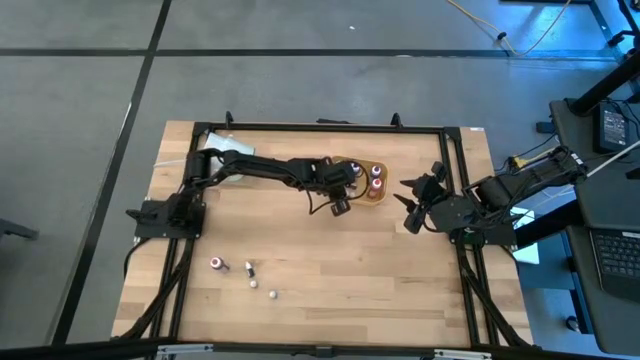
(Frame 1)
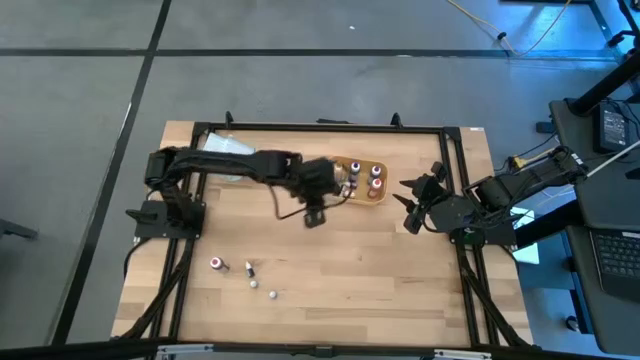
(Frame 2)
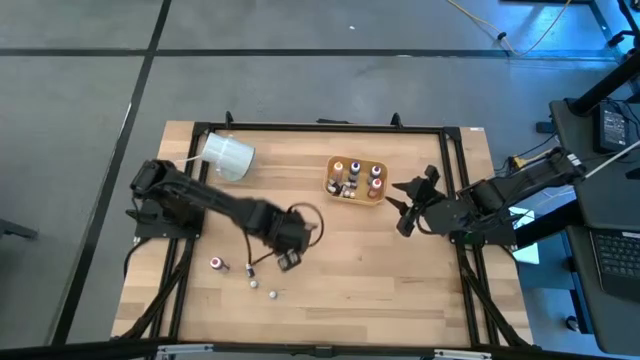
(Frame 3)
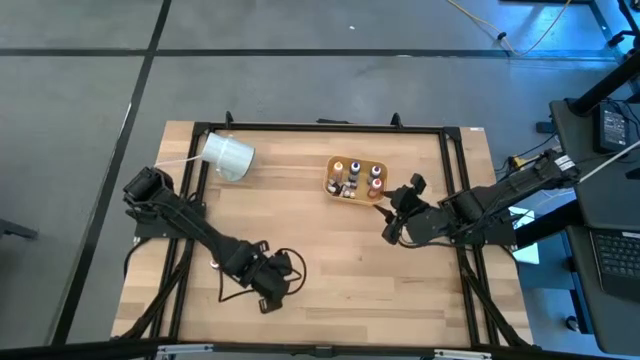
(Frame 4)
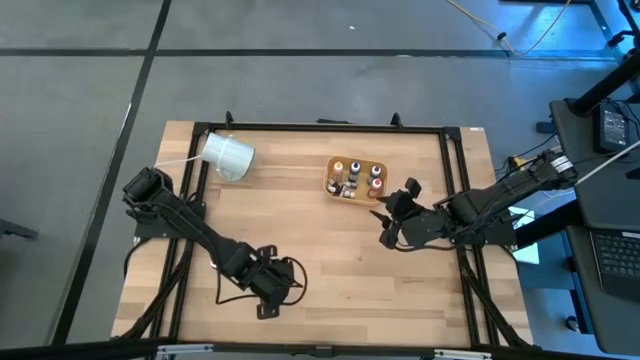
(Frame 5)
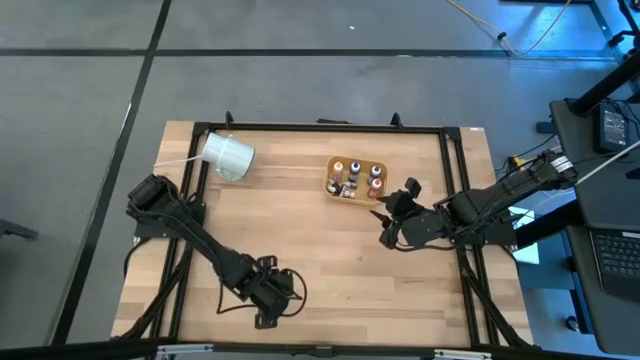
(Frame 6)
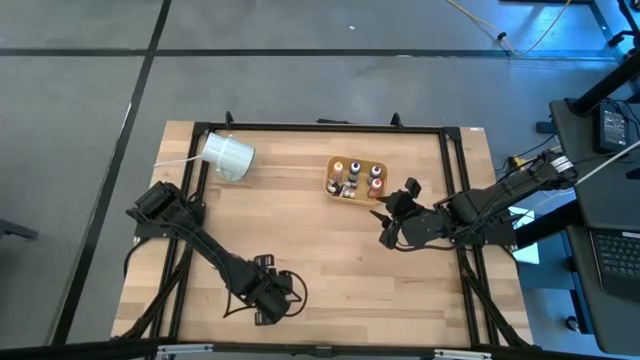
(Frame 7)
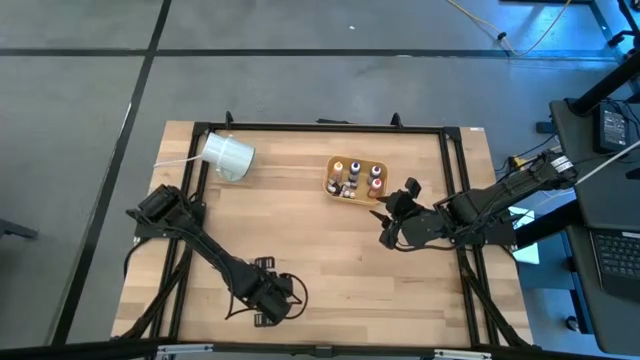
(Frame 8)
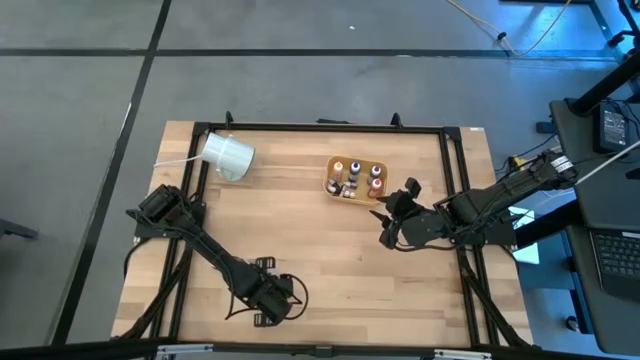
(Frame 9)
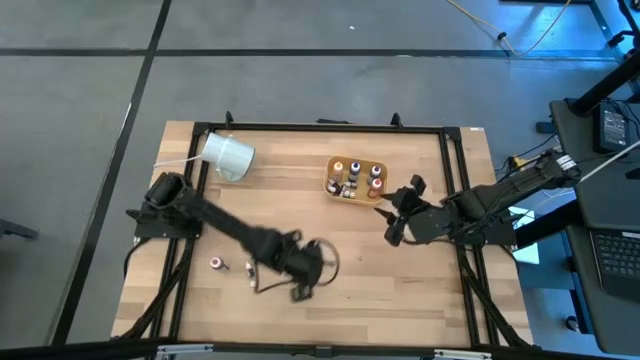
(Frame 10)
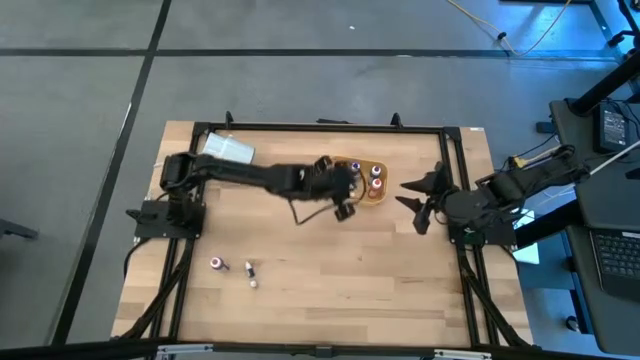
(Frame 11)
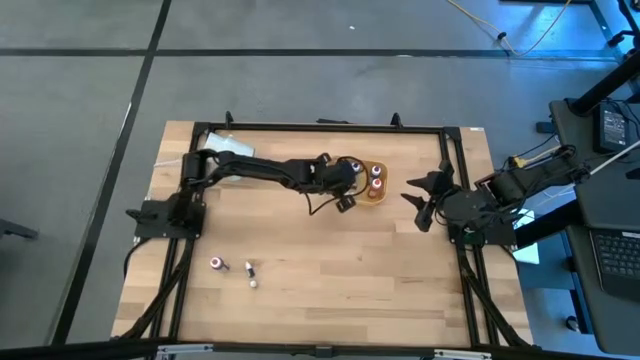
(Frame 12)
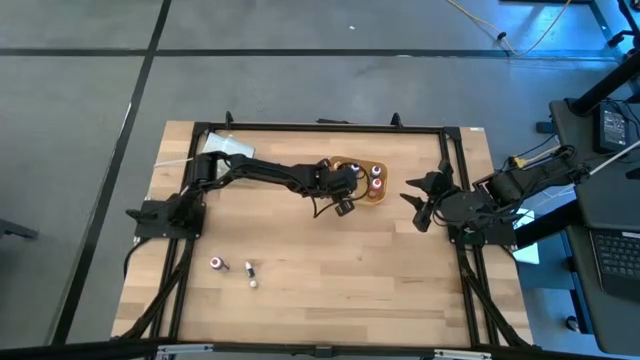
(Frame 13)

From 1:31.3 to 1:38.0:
Task: Pick & Place food coloring
Put the small blue food coloring bottle into the yellow bin

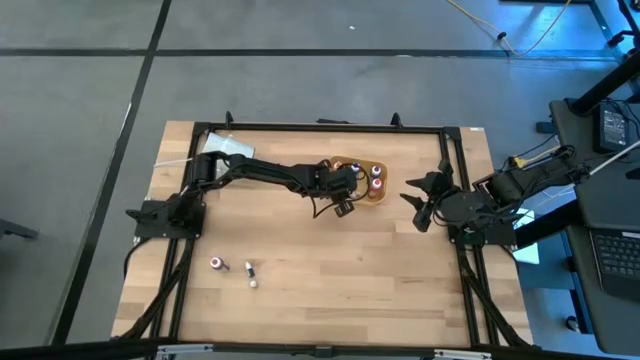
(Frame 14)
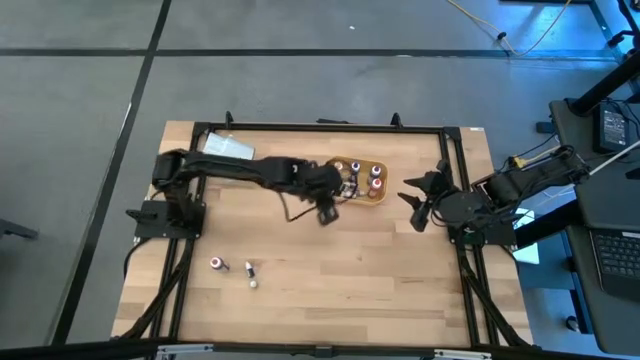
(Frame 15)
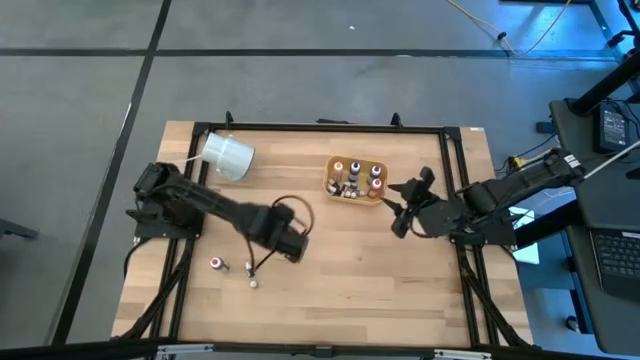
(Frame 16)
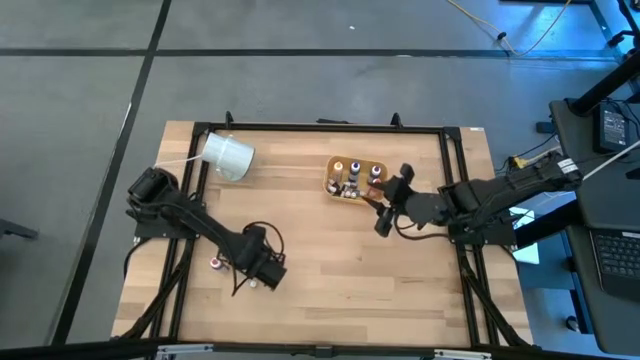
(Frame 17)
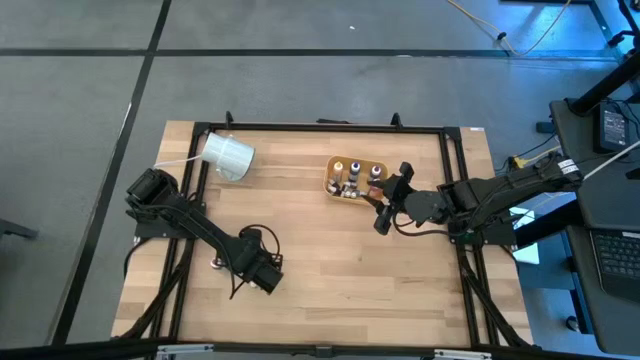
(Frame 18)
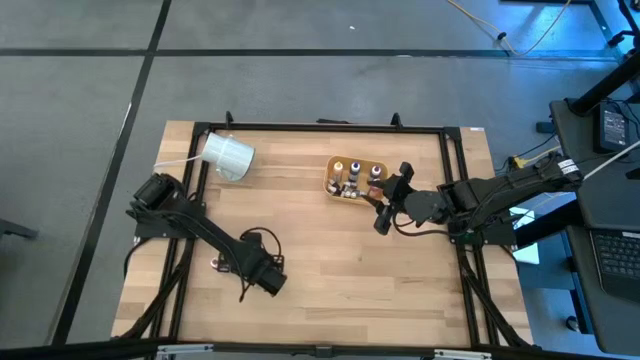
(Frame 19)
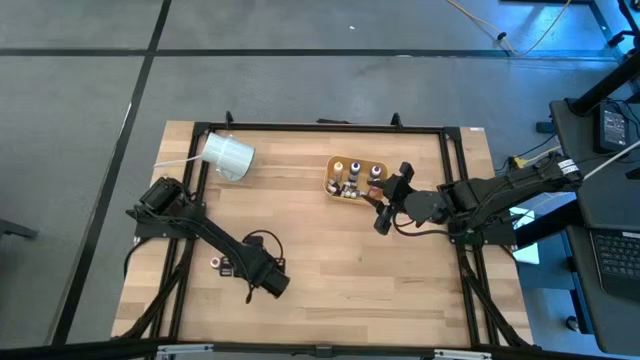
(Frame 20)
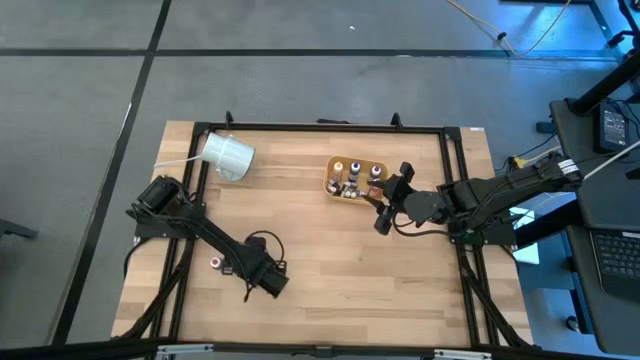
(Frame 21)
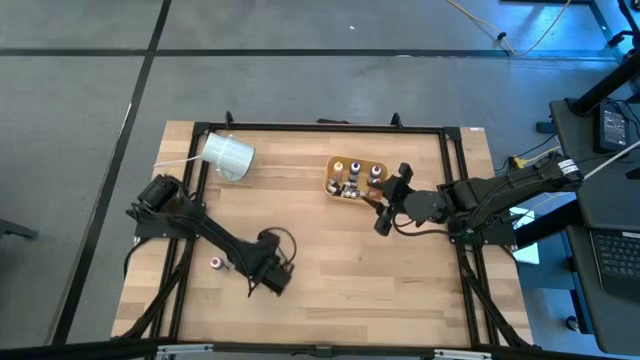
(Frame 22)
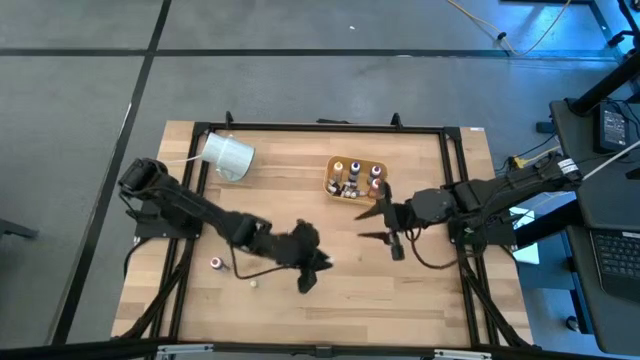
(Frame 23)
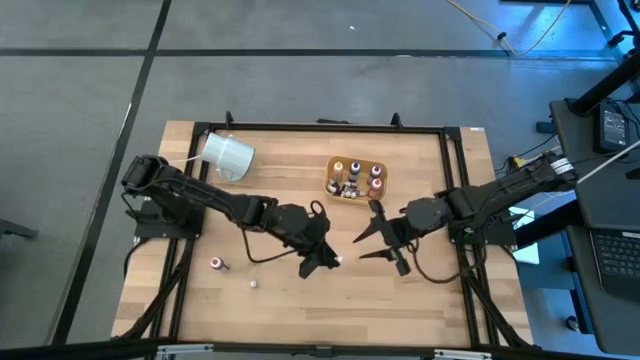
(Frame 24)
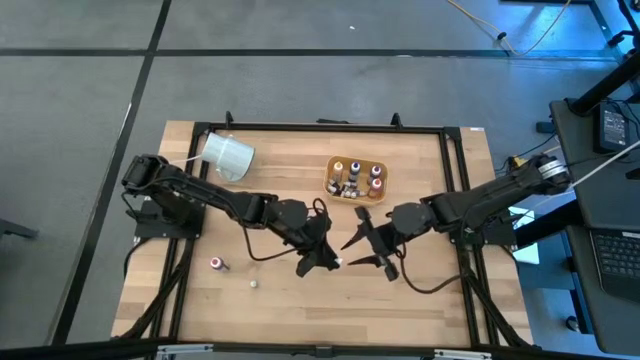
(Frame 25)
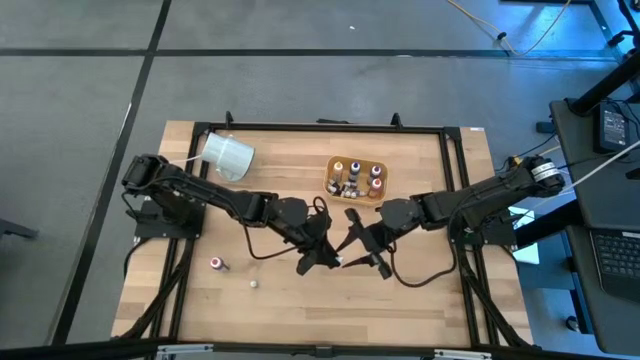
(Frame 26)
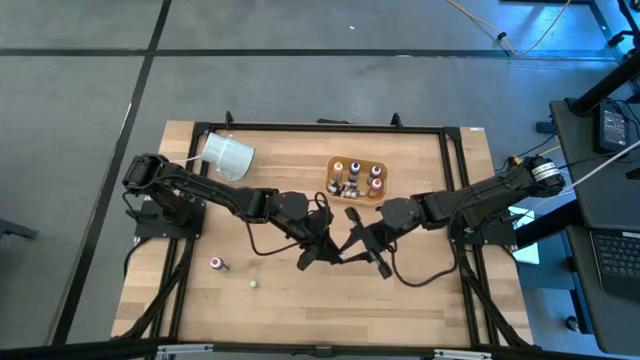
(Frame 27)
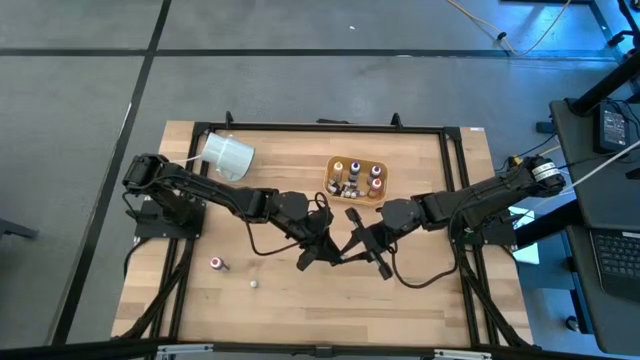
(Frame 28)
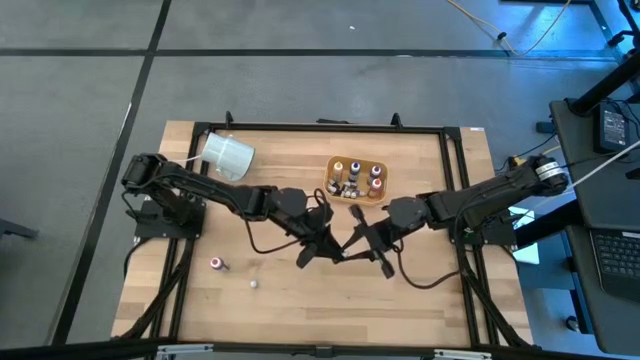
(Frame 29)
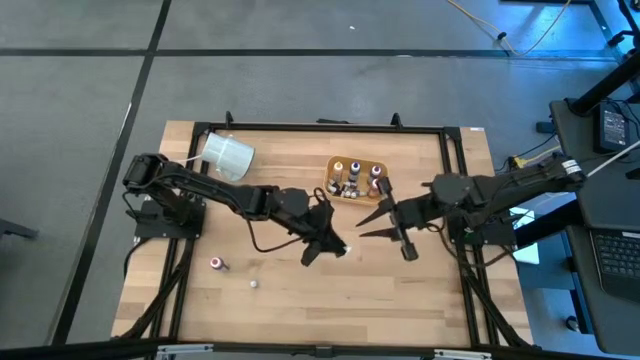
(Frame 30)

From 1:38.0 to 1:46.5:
Put the small green food coloring bottle into the yellow bin

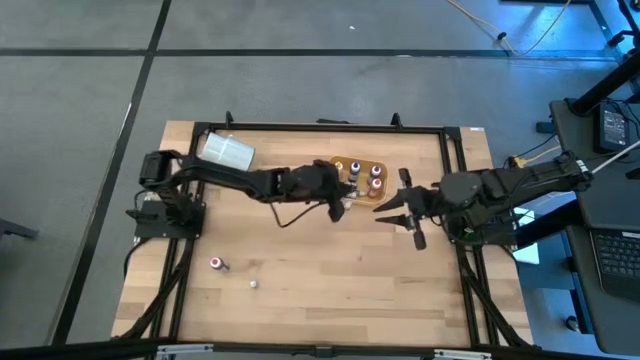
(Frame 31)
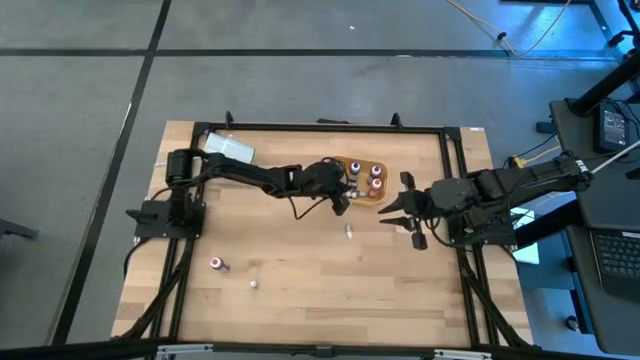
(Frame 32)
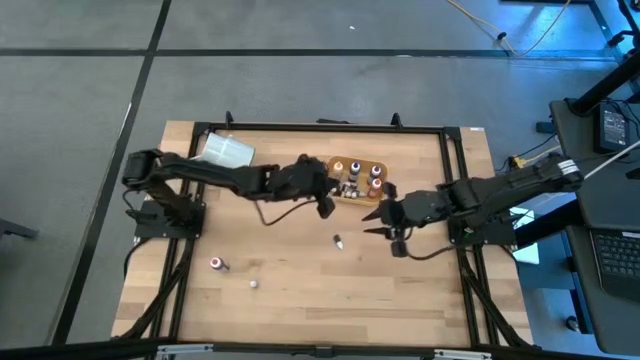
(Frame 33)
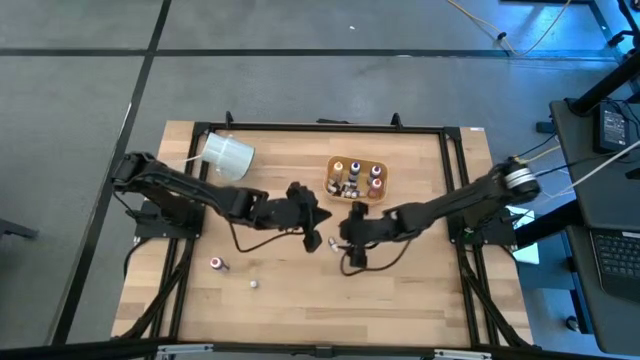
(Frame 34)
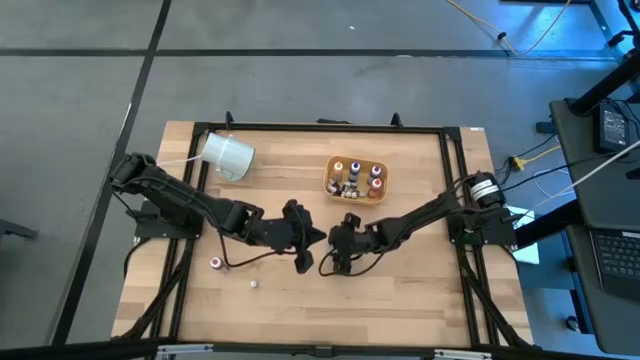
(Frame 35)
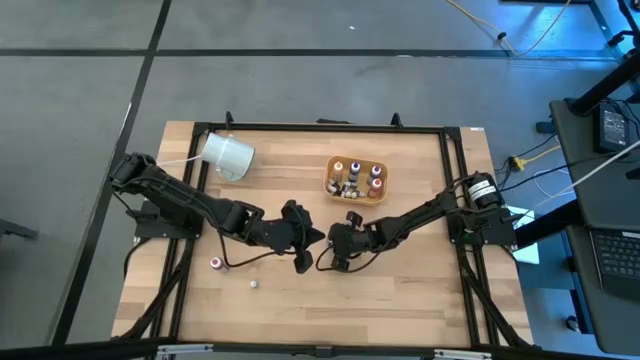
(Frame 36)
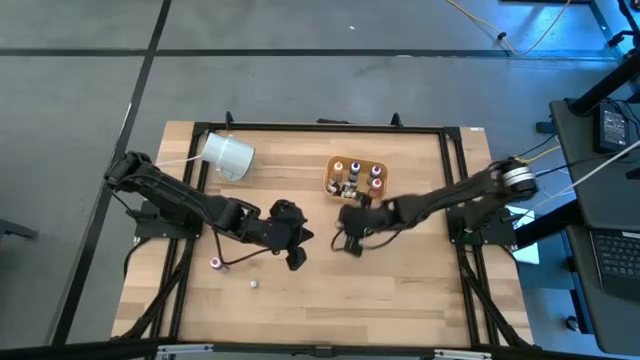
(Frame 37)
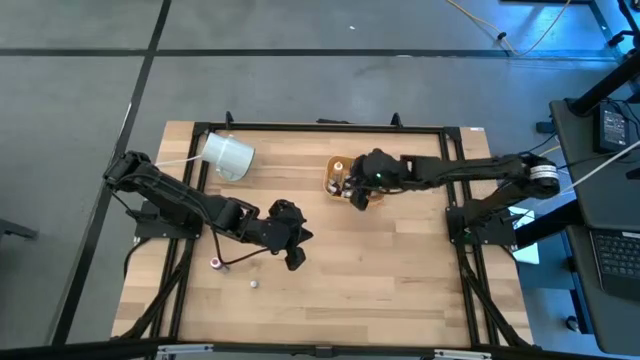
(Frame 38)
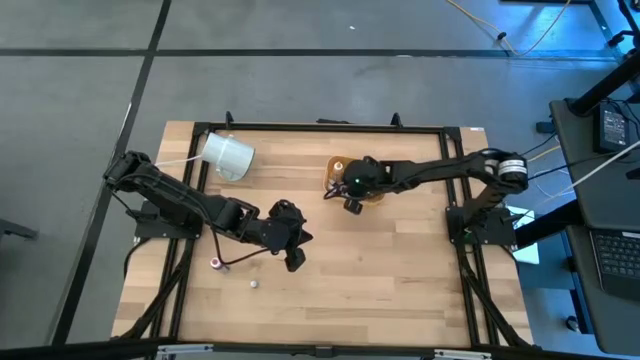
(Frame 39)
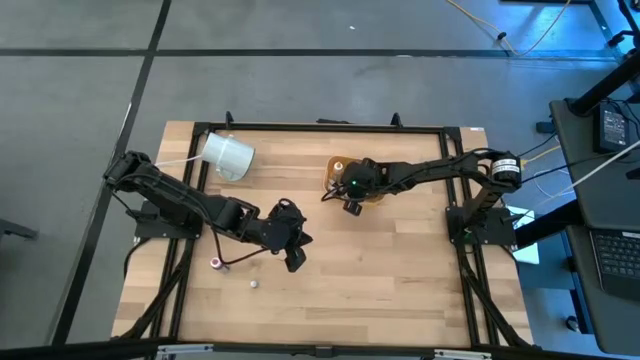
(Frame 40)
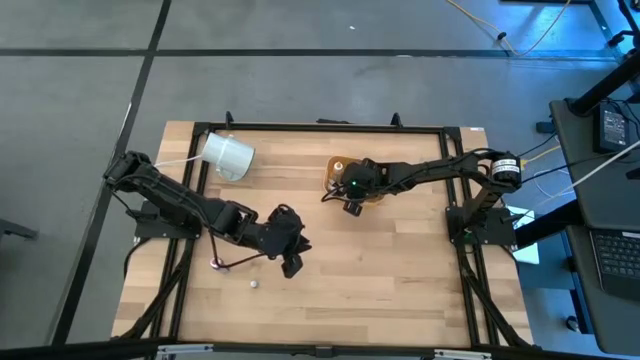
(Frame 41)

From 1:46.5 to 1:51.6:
Put the small green food coloring bottle into the yellow bin
